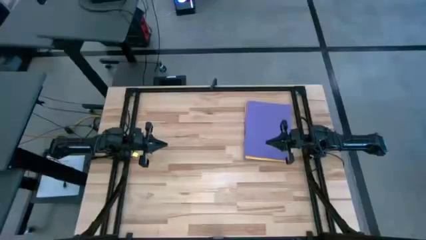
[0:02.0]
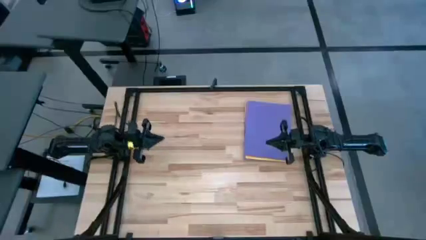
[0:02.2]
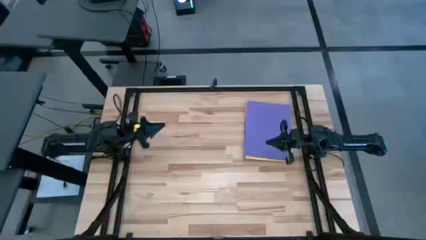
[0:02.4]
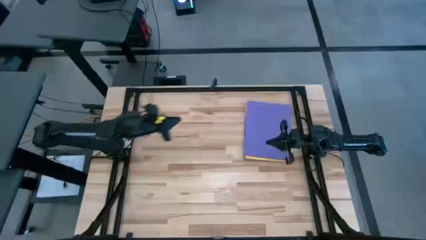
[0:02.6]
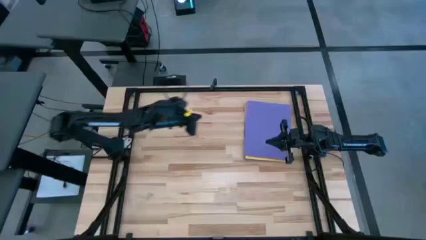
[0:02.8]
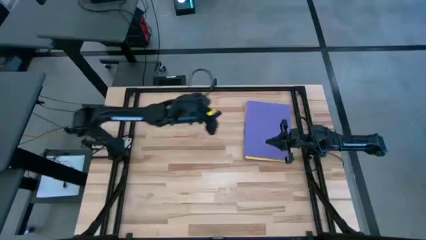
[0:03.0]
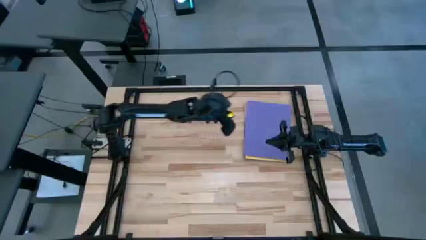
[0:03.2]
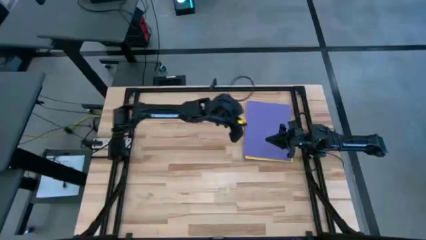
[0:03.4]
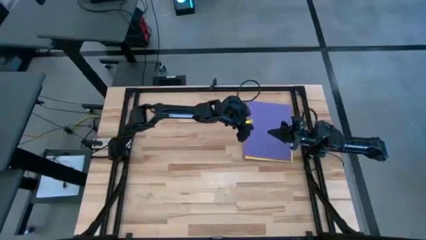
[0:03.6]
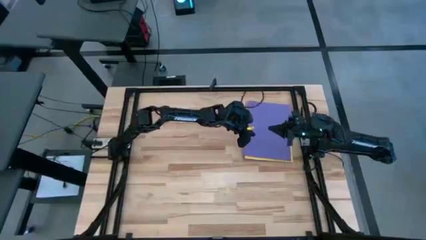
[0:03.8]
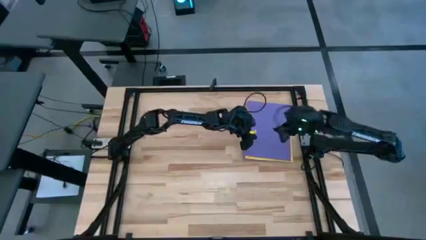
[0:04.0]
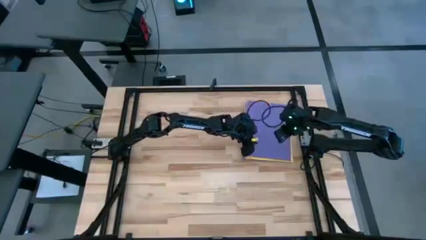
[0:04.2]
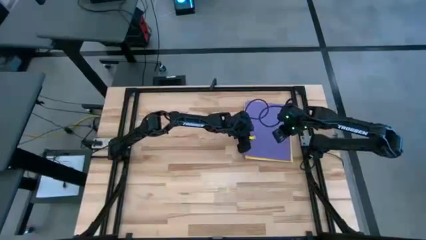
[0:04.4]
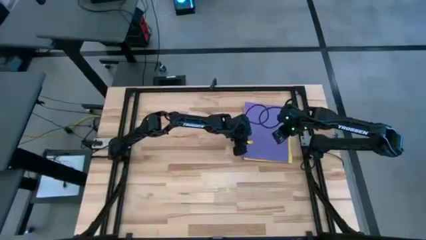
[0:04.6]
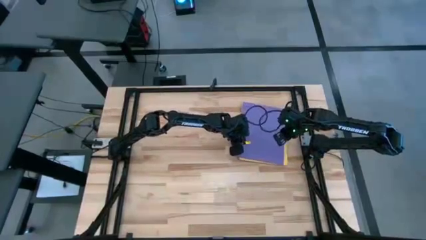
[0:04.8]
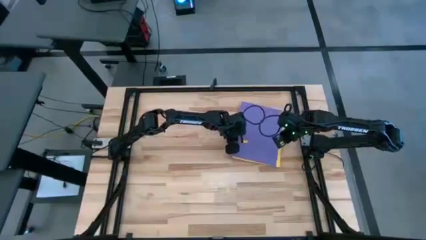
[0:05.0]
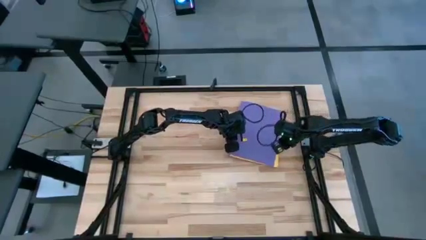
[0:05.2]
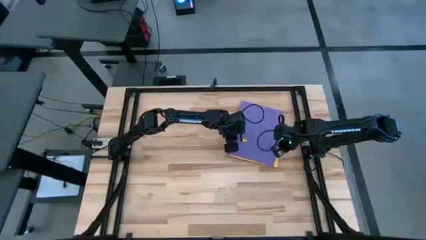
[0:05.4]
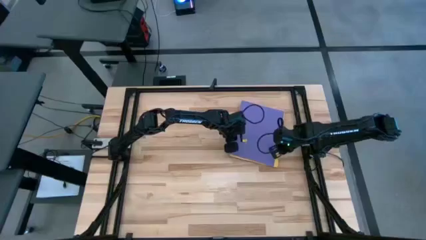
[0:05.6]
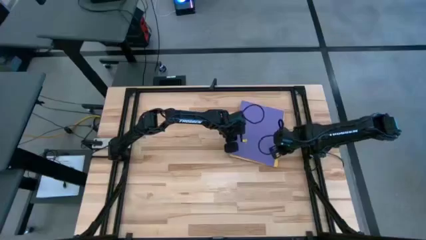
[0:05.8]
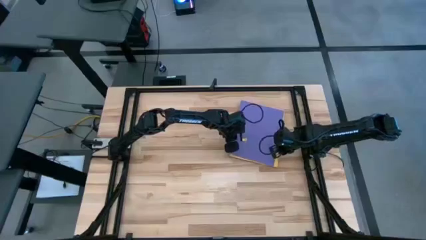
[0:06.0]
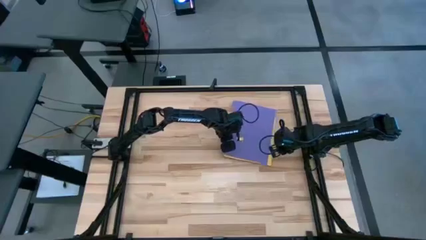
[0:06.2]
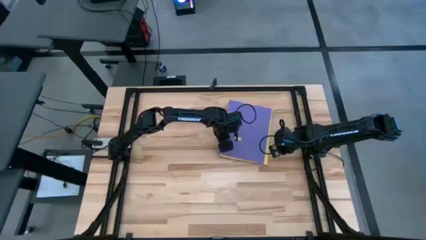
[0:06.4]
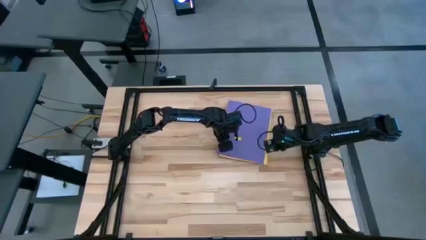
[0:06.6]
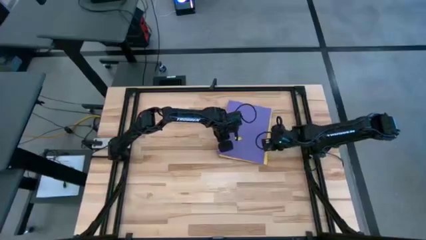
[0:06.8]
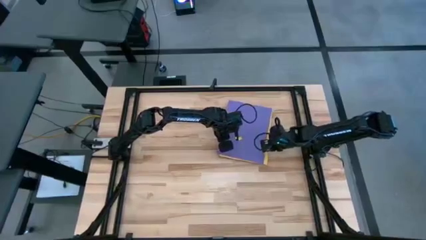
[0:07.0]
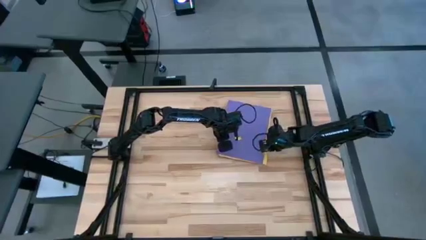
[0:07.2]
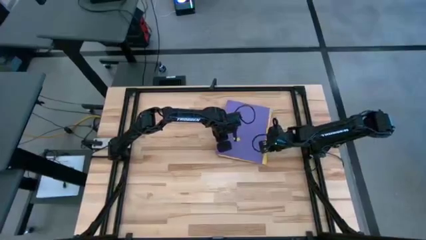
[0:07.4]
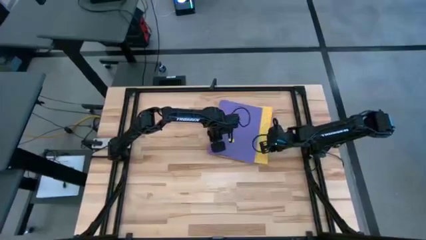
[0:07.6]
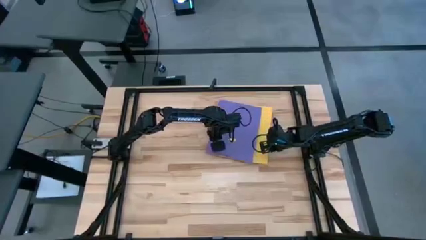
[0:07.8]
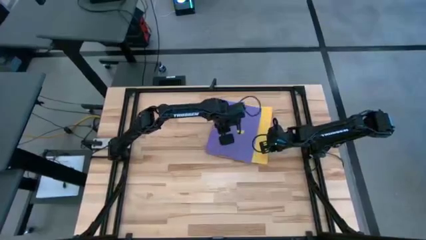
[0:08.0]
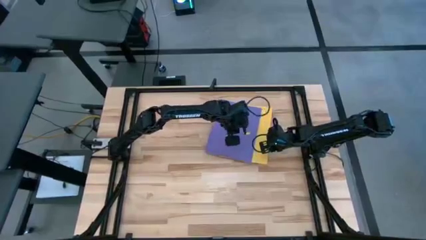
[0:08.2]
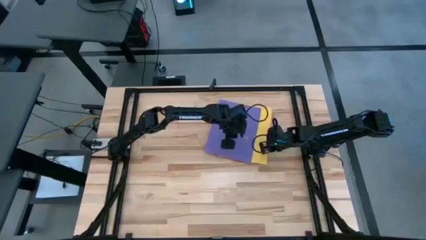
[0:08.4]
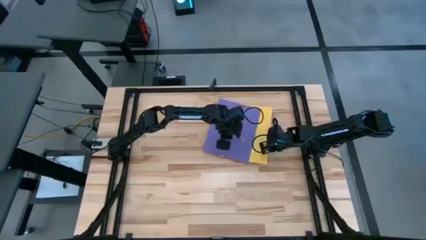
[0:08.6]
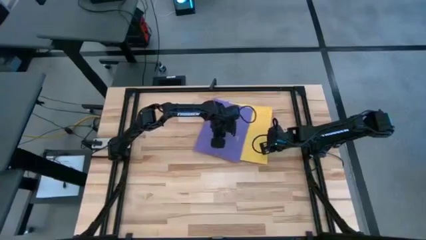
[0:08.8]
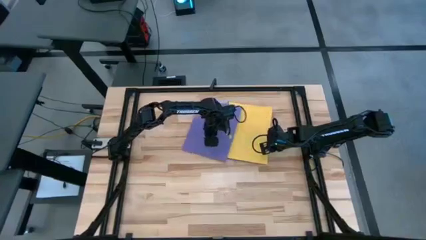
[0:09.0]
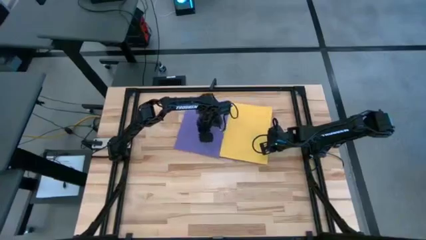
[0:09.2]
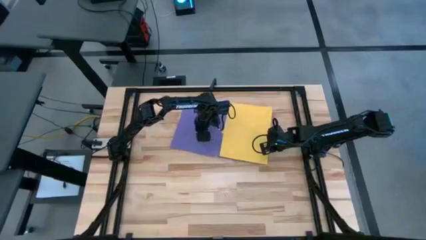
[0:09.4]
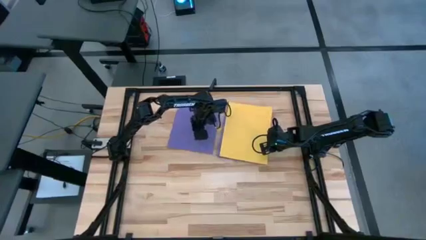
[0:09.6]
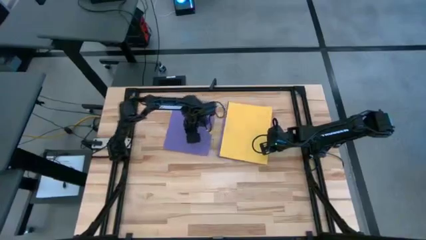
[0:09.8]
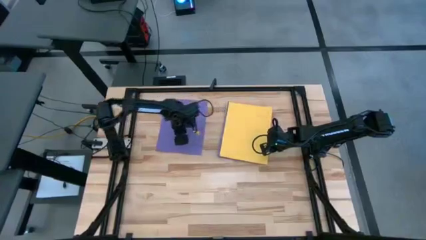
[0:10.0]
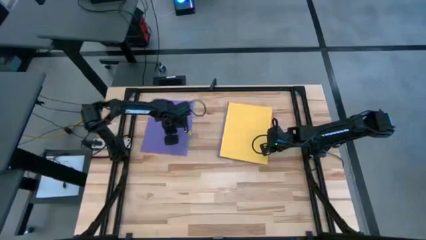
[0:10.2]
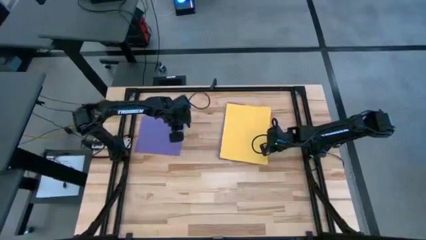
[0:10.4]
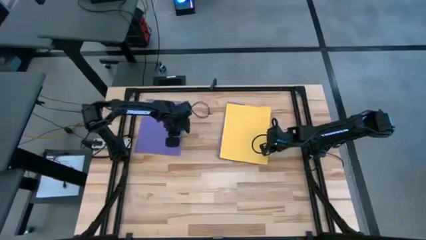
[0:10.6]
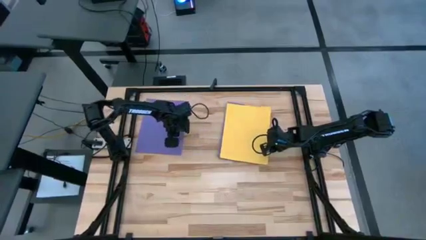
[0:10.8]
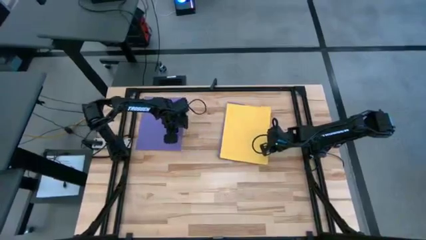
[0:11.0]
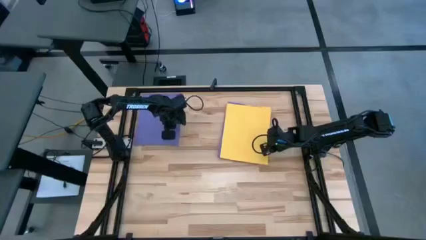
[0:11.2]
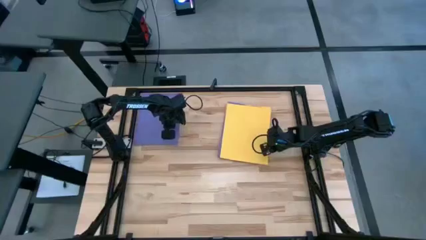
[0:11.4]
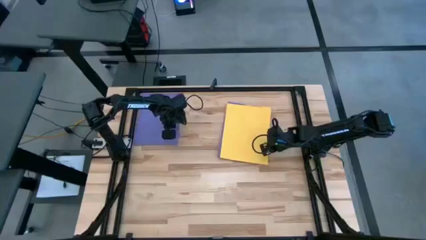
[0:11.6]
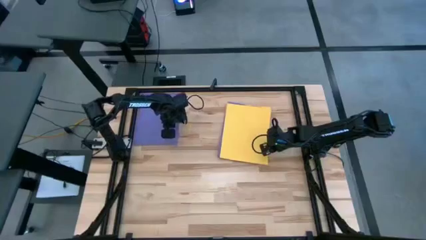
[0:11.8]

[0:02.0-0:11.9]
Task: Organize paper
Move the purple paper to the top left of the table

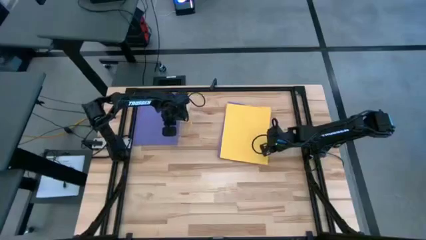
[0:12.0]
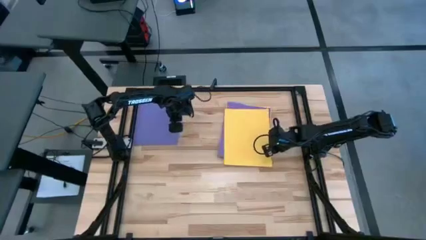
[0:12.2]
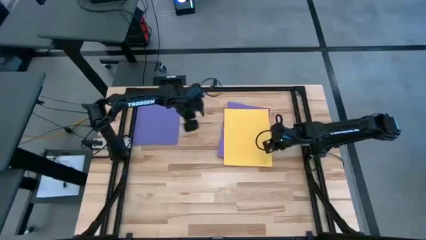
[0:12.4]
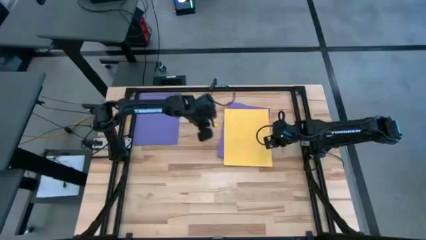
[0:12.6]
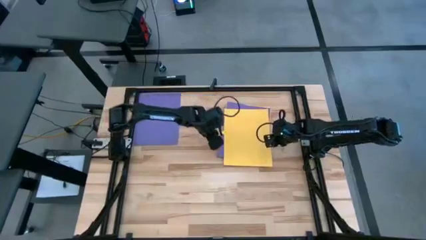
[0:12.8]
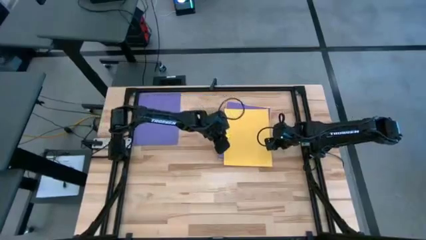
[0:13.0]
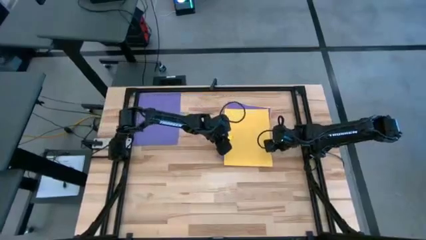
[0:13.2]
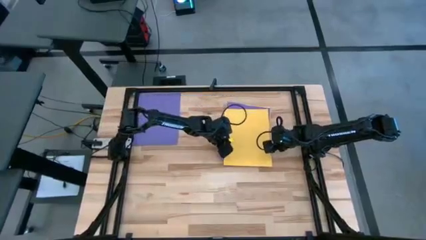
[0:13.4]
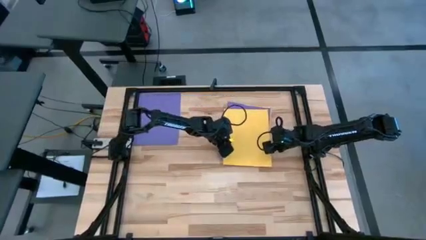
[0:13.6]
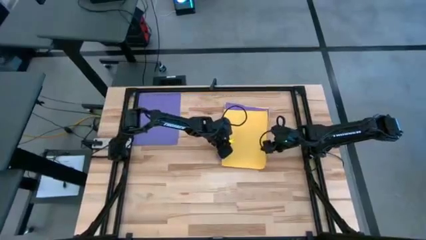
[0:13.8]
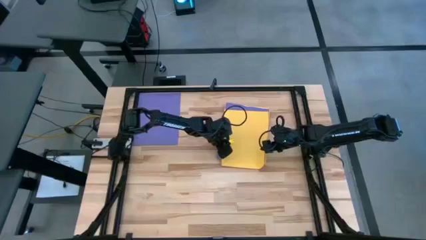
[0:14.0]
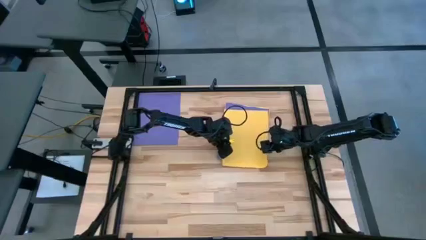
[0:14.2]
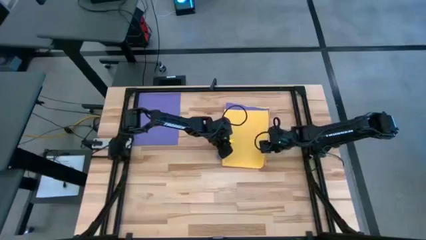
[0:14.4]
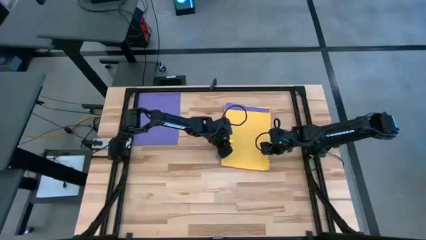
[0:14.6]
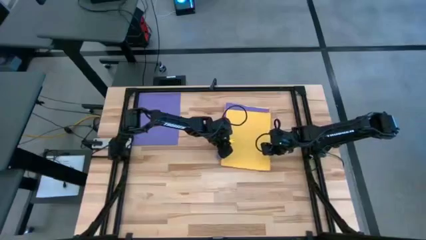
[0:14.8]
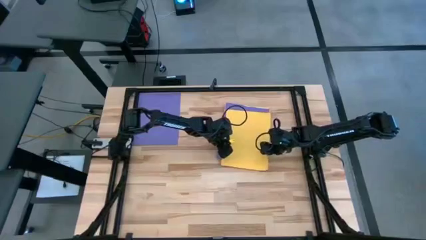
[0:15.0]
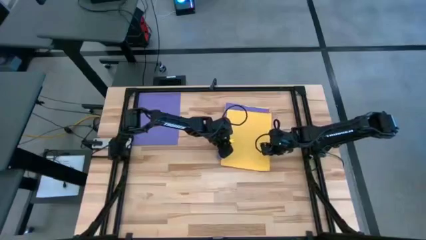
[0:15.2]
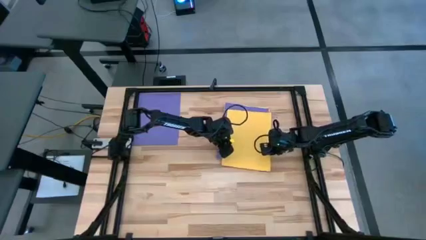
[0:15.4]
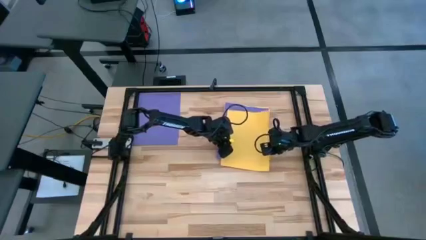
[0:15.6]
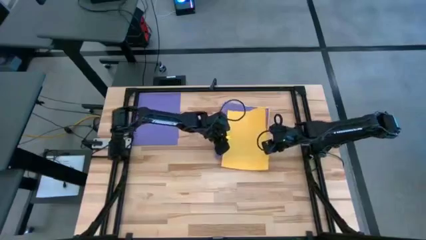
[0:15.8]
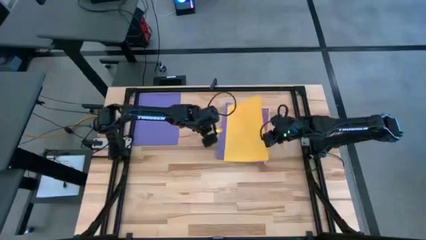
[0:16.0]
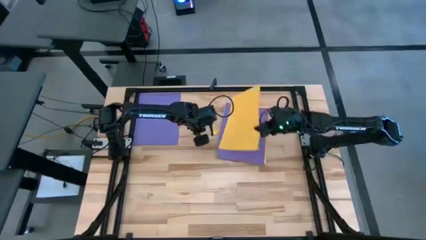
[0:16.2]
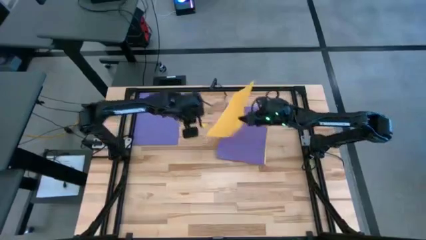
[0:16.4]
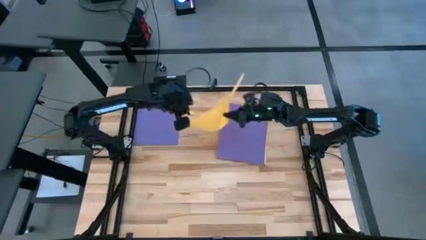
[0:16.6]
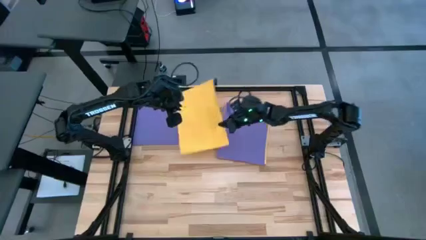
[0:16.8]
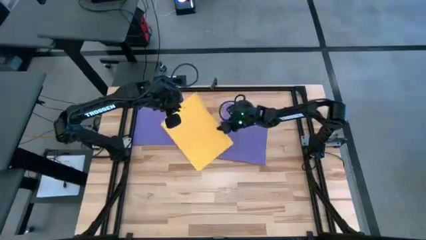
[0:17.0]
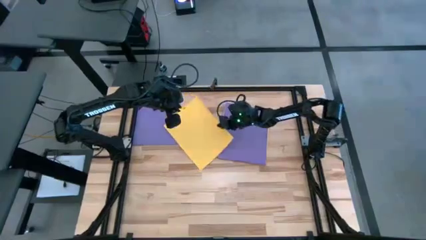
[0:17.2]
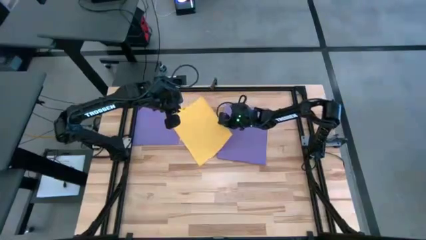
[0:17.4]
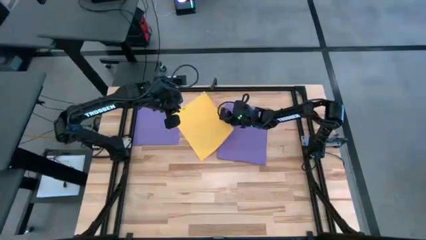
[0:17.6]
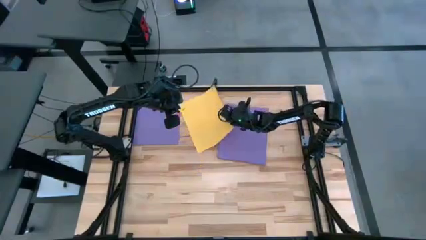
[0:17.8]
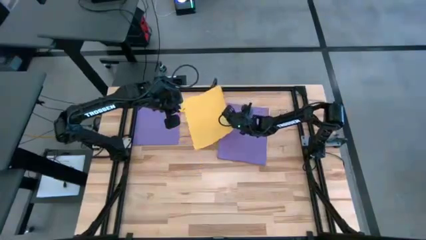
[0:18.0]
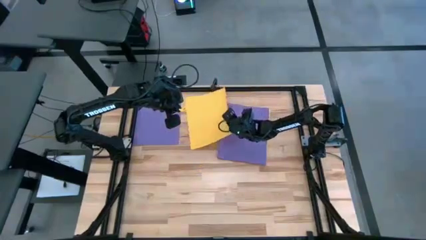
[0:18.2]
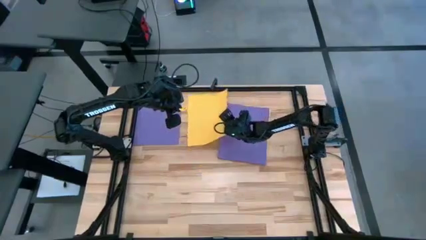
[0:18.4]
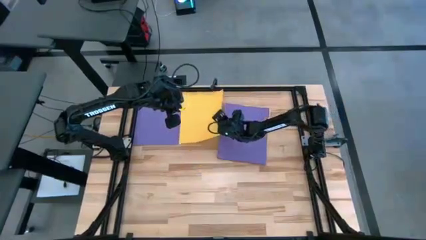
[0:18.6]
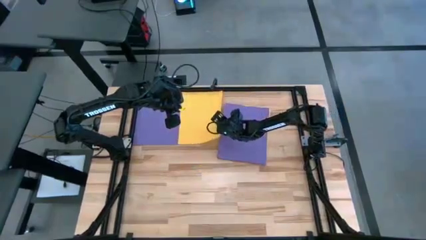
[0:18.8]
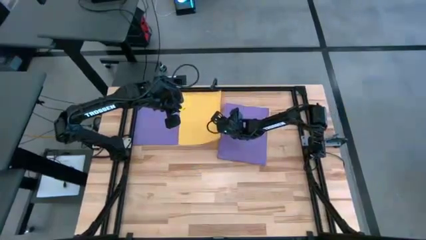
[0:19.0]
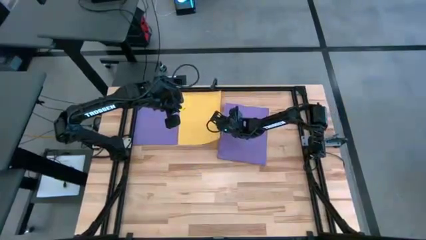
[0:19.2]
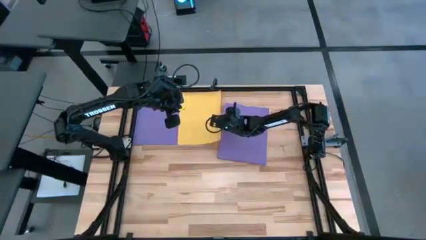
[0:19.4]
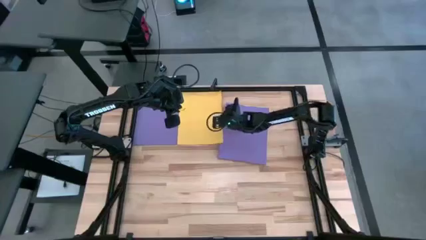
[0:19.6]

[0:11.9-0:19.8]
Move the yellow paper to the top center of the table
